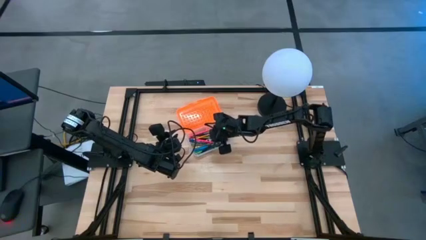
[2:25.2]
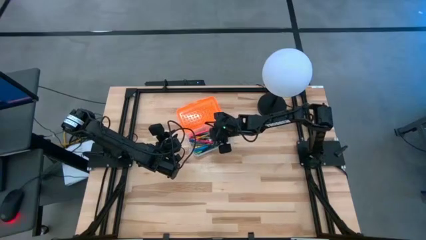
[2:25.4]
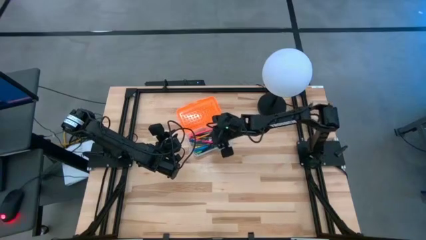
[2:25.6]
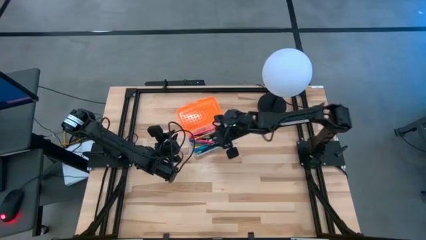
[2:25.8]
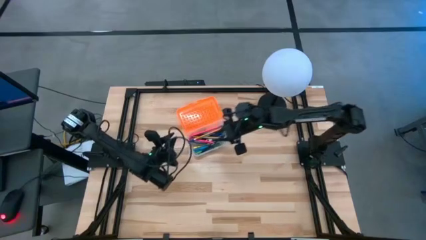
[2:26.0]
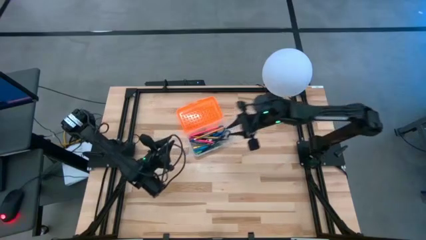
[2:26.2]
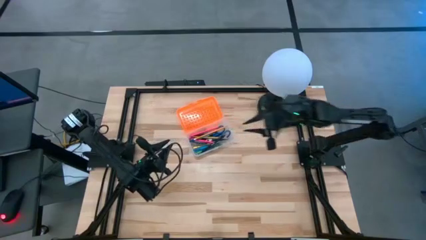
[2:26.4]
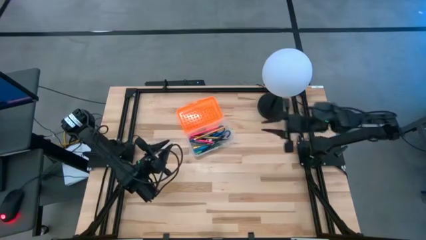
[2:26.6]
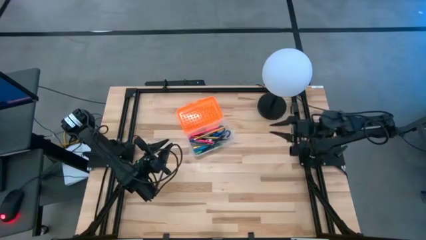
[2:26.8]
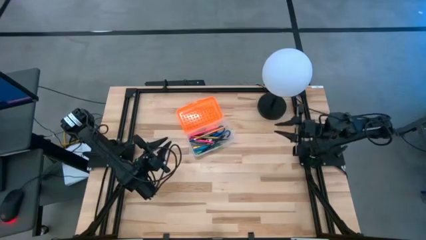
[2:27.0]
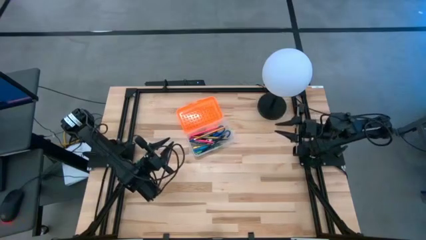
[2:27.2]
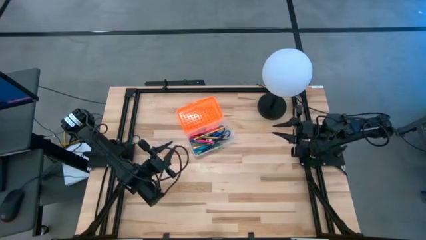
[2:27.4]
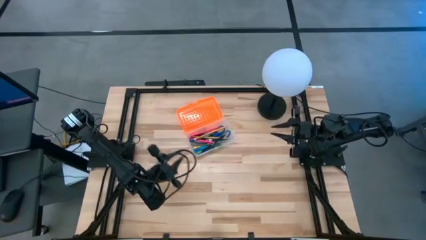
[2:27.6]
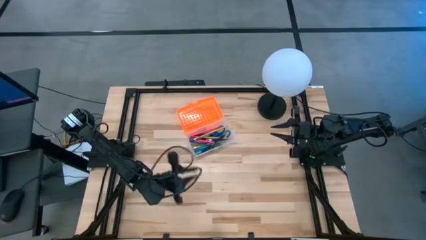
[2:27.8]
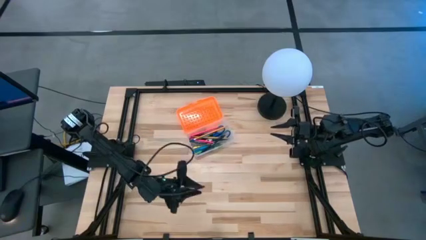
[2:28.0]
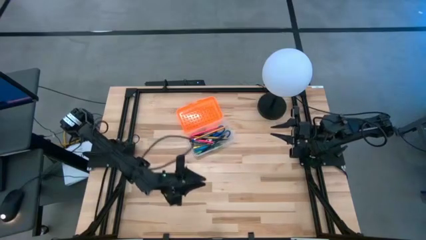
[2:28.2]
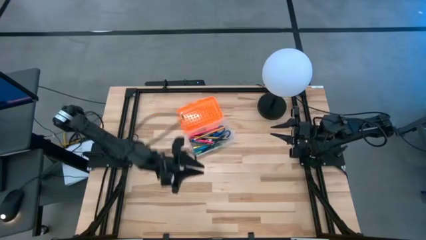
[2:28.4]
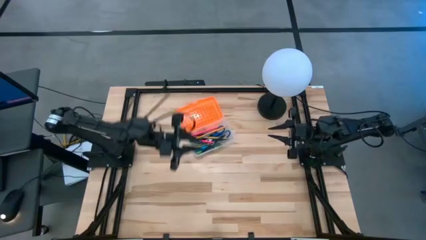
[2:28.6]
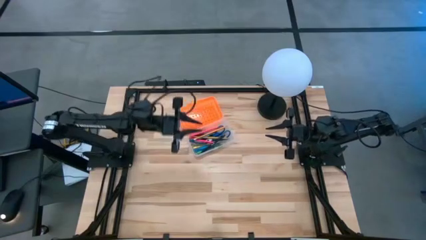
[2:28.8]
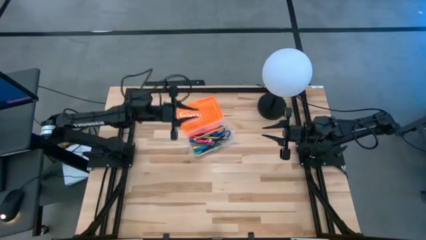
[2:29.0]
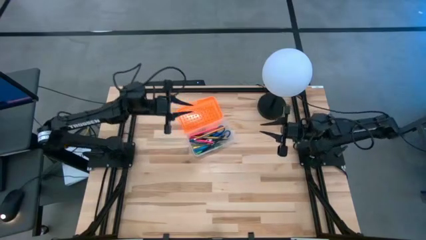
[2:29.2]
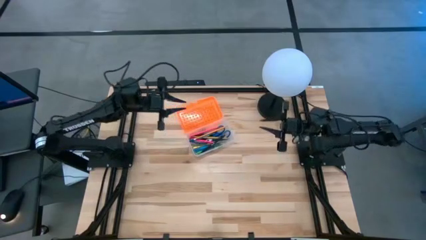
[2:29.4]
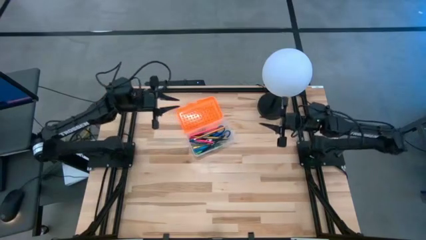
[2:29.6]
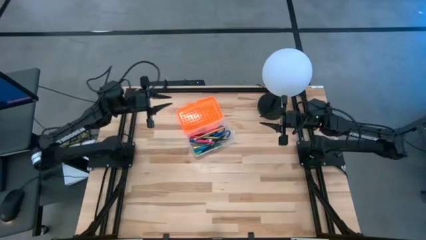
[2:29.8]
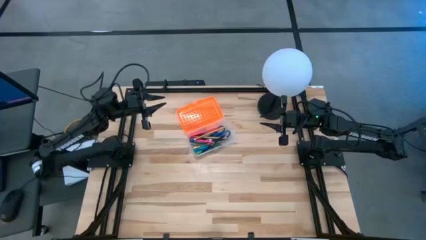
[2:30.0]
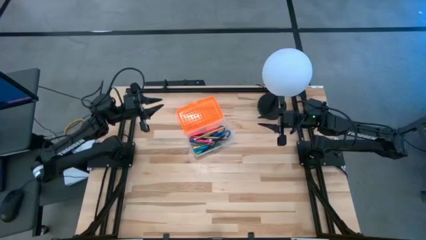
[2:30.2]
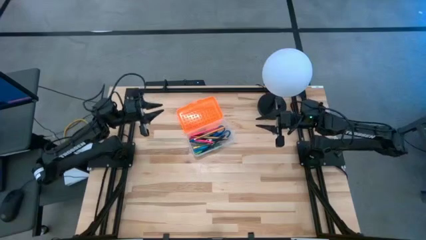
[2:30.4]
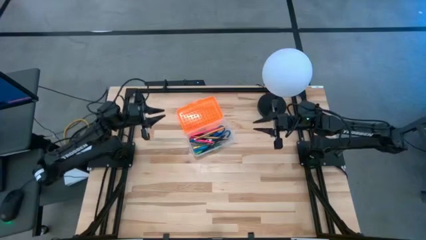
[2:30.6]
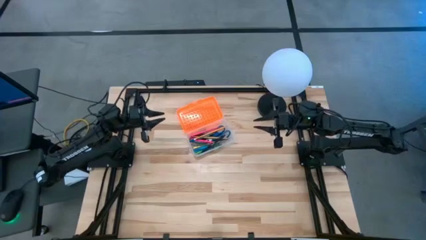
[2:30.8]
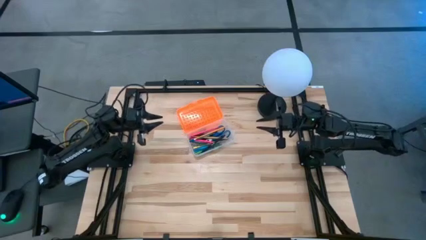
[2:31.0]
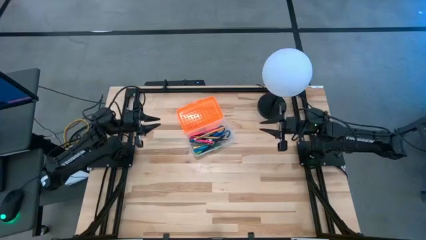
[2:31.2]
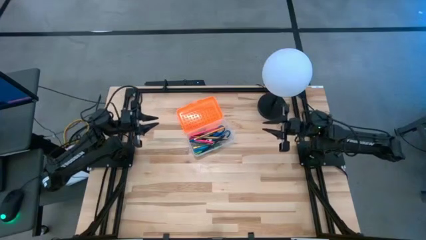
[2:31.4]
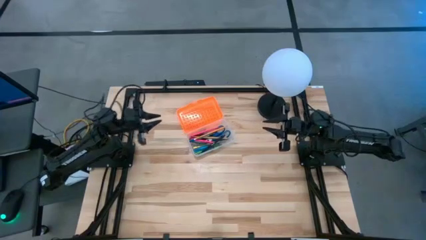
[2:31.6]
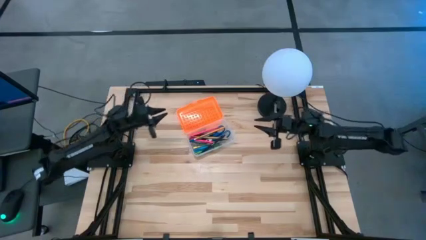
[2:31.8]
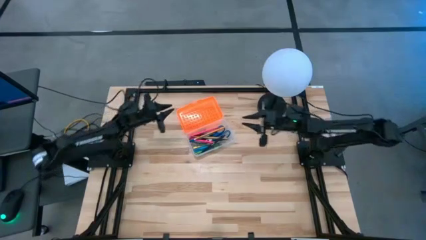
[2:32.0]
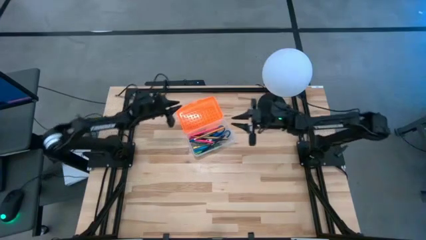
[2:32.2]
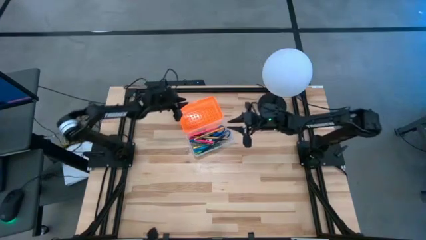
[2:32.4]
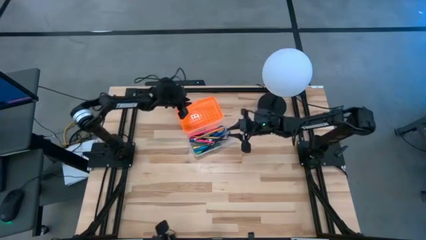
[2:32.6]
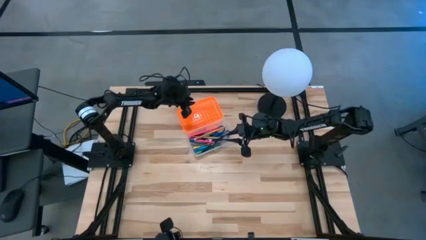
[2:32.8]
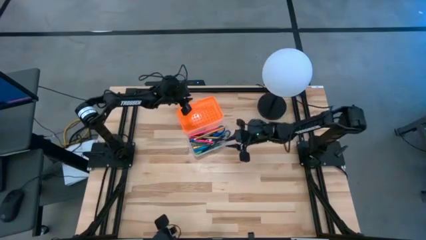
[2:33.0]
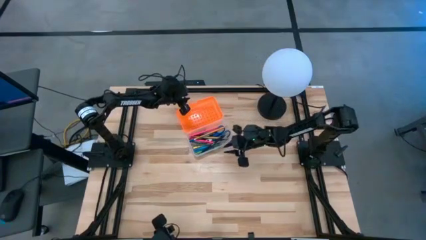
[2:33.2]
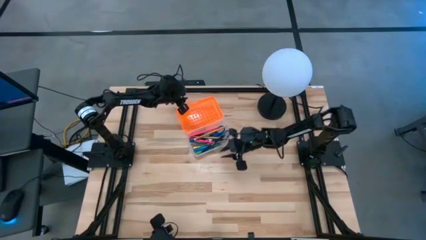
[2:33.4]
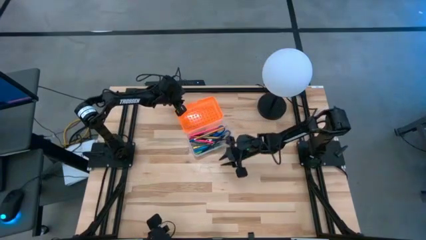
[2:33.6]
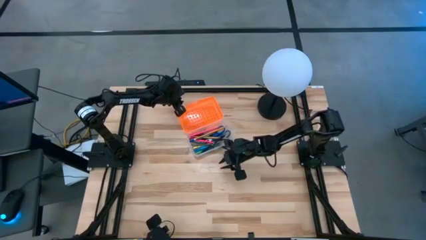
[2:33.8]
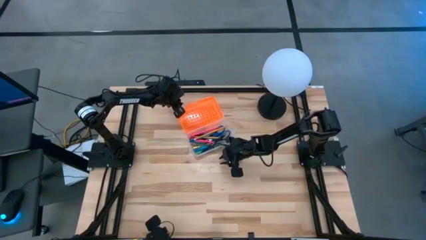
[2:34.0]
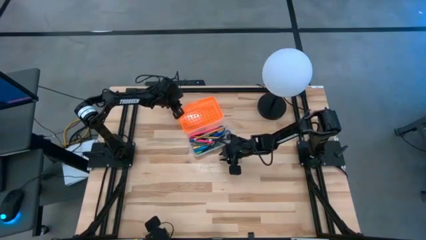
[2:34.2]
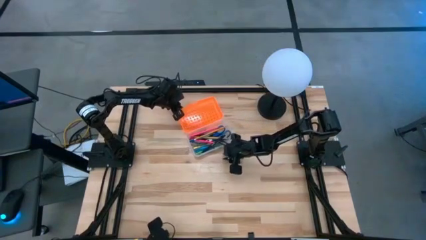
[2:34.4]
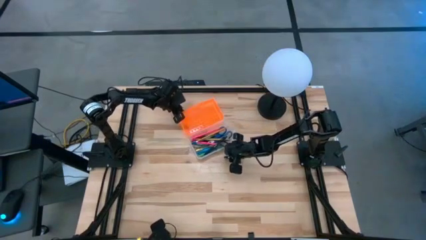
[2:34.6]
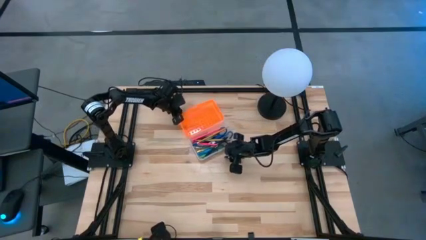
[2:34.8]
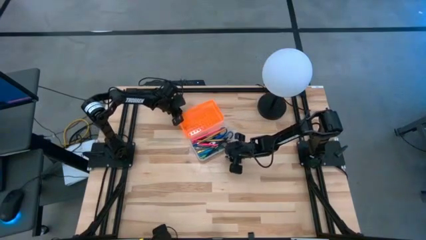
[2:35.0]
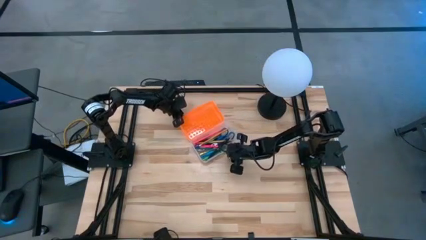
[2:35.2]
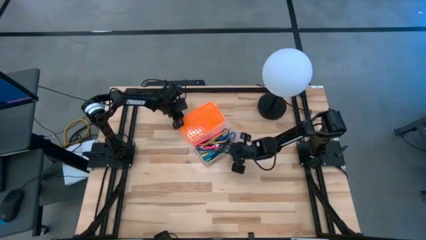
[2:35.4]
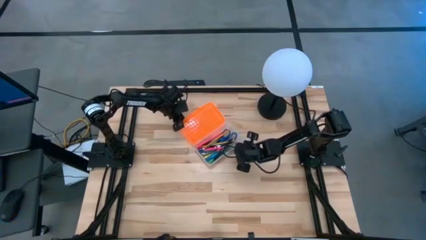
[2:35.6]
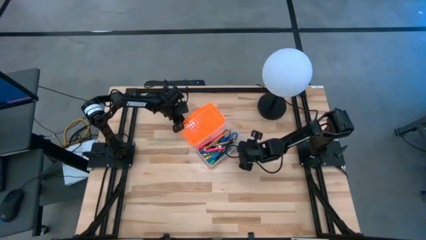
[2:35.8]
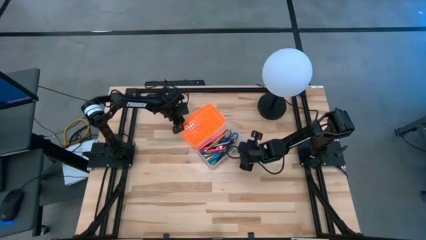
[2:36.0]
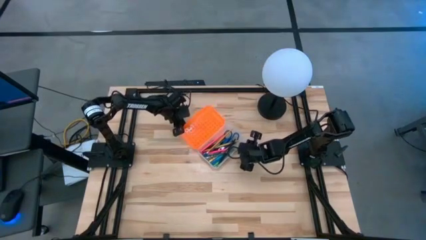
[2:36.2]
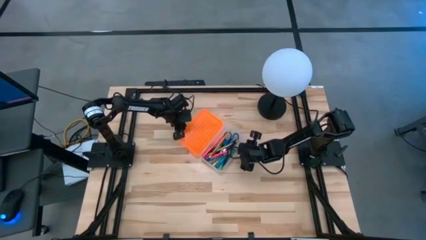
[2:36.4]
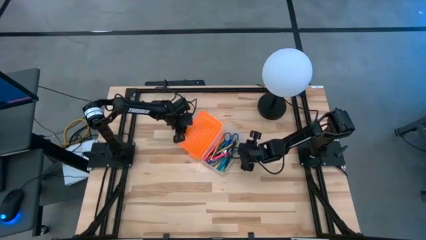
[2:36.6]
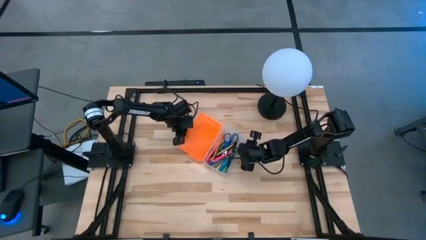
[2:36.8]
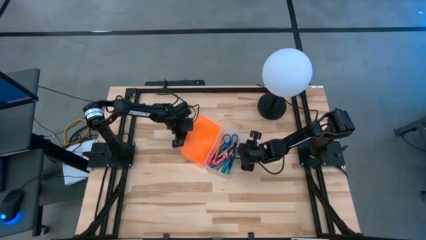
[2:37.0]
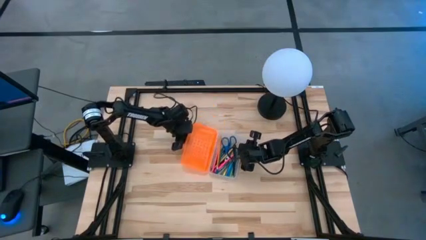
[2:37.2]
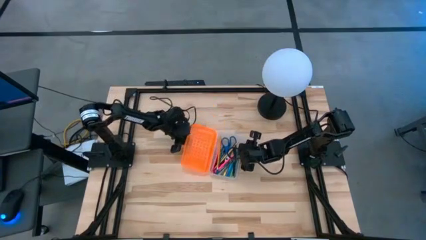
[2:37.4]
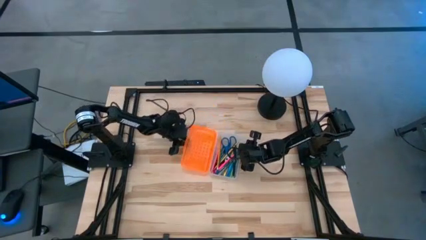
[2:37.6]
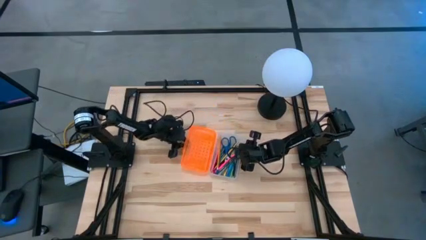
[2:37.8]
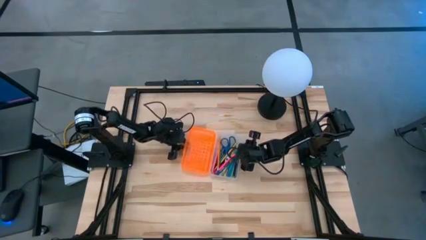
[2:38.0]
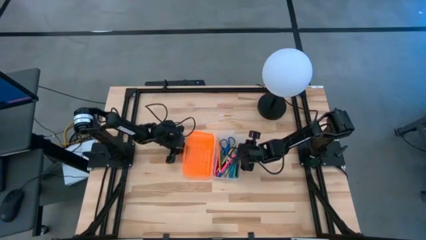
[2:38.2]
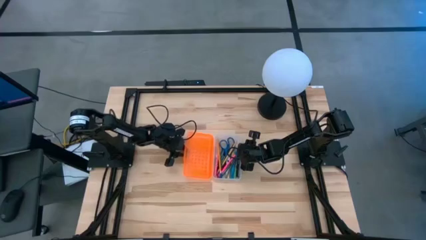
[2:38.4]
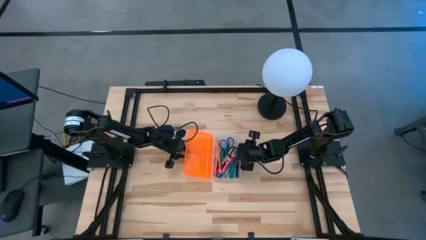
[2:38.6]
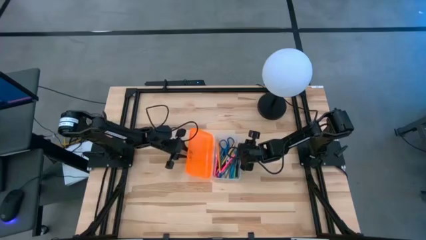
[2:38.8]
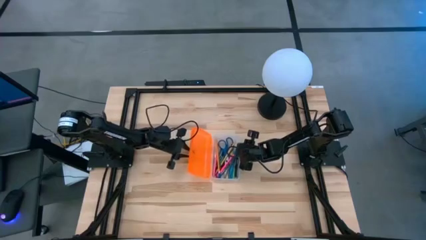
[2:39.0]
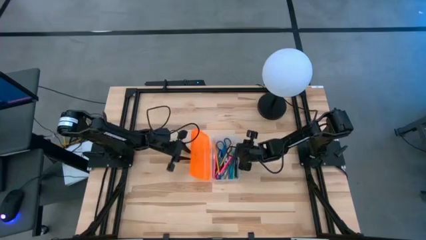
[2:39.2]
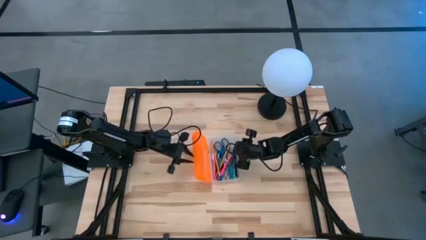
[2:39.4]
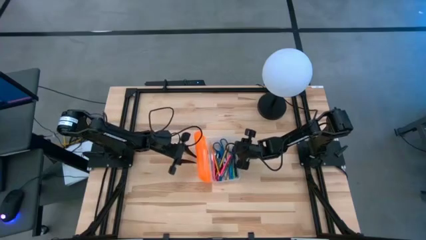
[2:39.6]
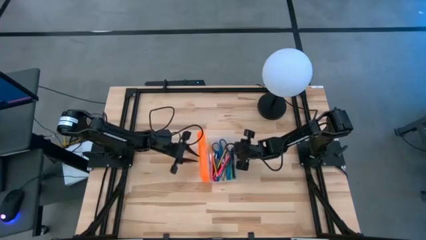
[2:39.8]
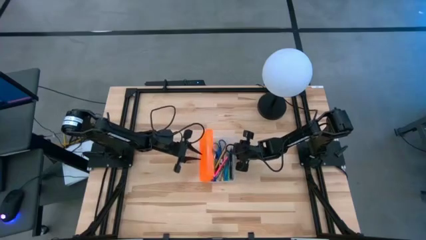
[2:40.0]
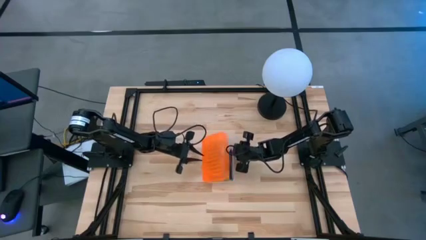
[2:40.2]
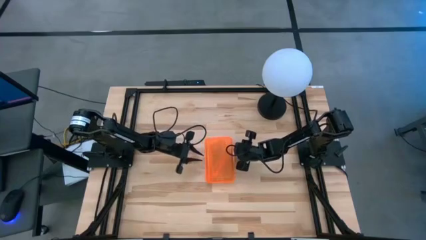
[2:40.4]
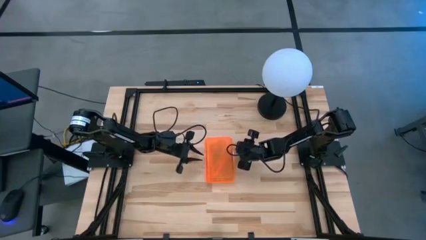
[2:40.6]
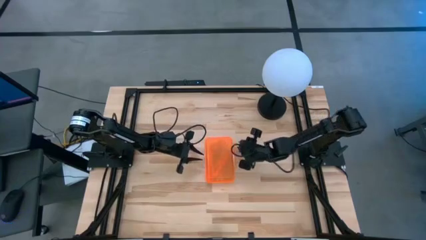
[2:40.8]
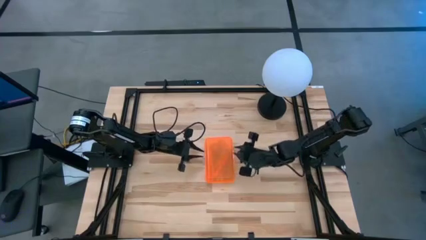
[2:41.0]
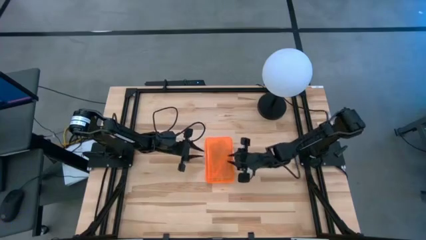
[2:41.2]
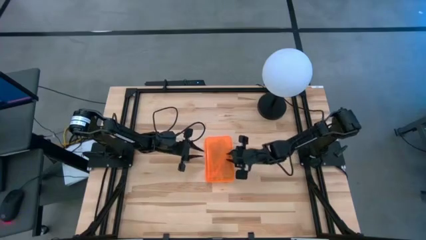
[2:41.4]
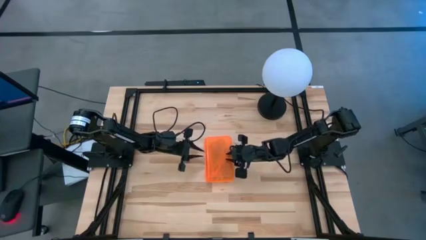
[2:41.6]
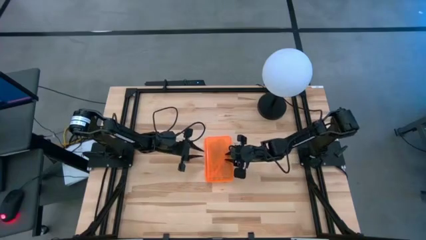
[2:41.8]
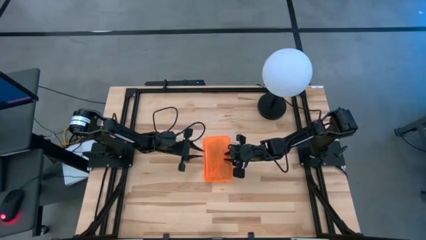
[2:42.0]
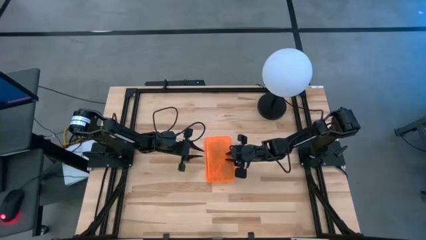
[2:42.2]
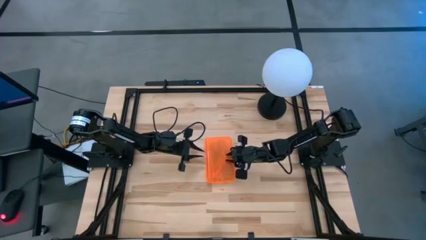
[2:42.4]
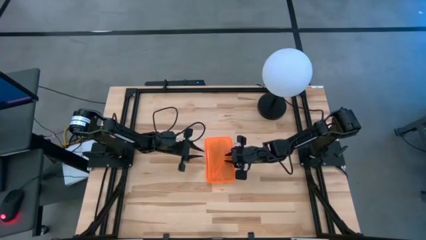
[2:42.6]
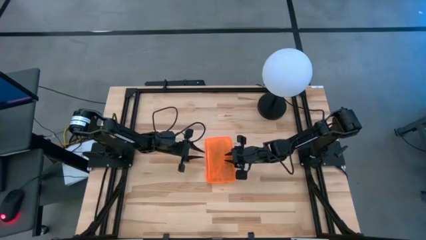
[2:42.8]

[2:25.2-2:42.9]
Task: Pick & place school supplies into a supply box
Close the supply box
